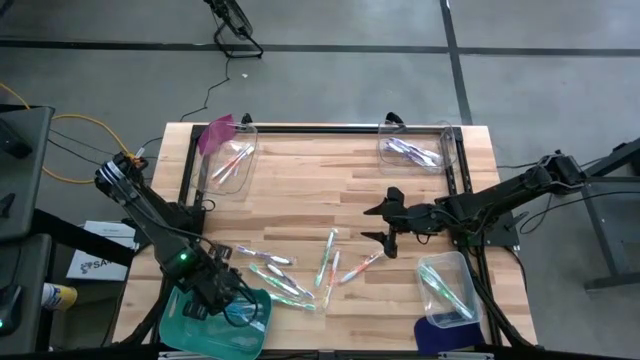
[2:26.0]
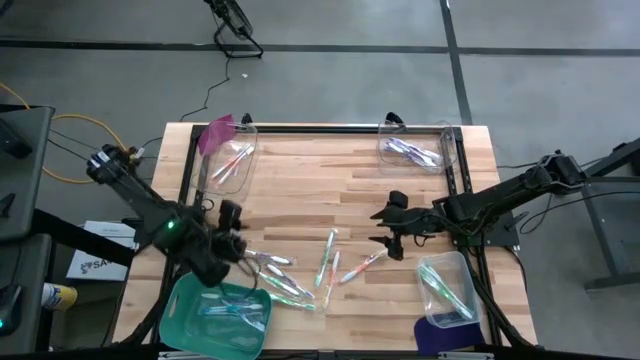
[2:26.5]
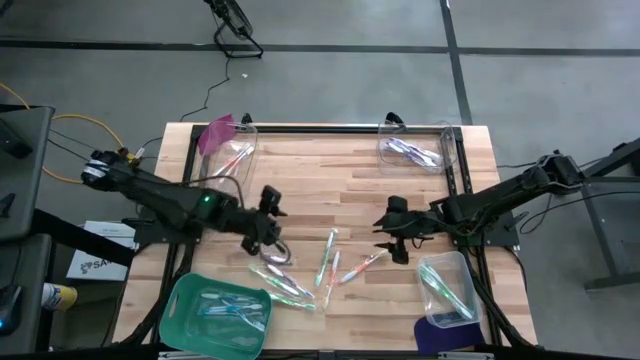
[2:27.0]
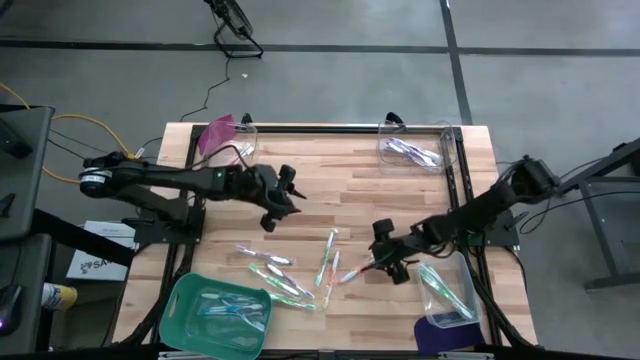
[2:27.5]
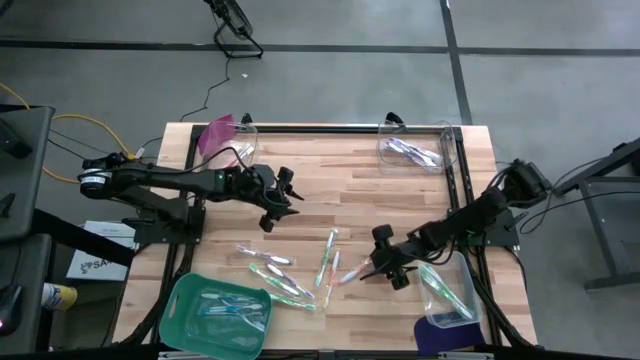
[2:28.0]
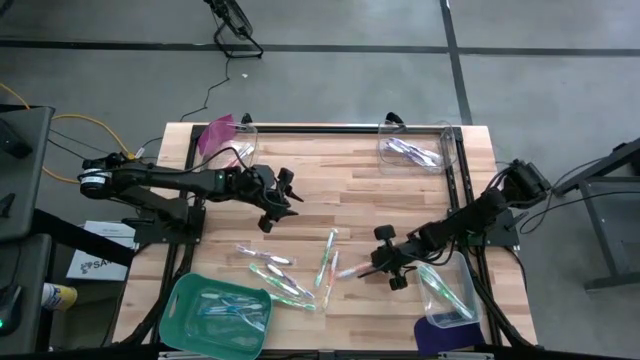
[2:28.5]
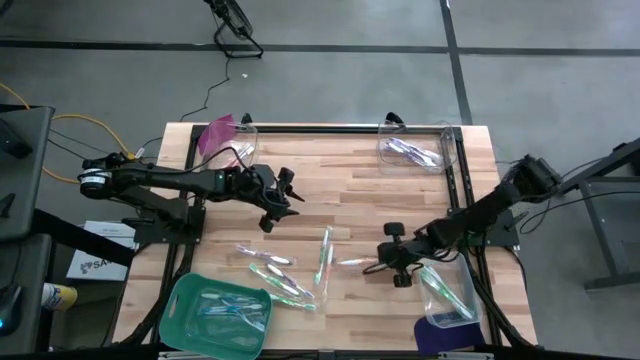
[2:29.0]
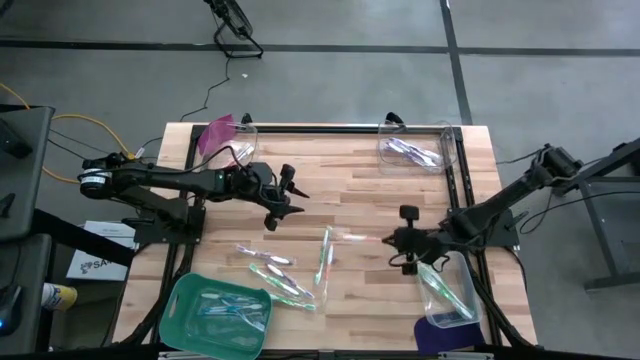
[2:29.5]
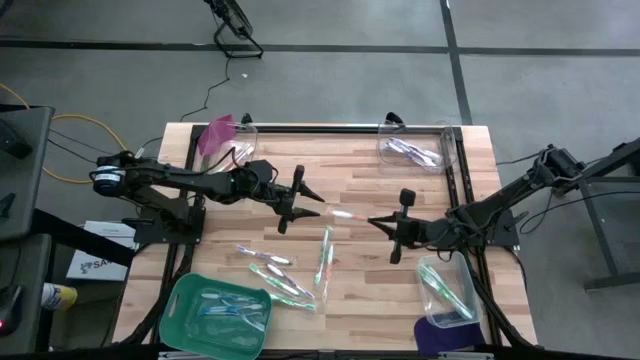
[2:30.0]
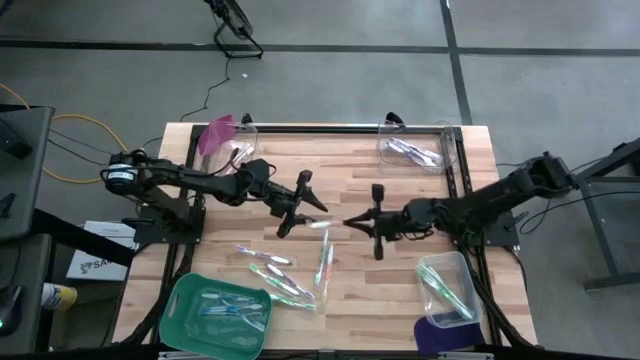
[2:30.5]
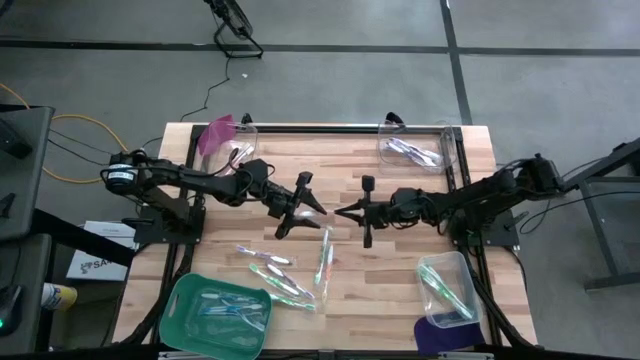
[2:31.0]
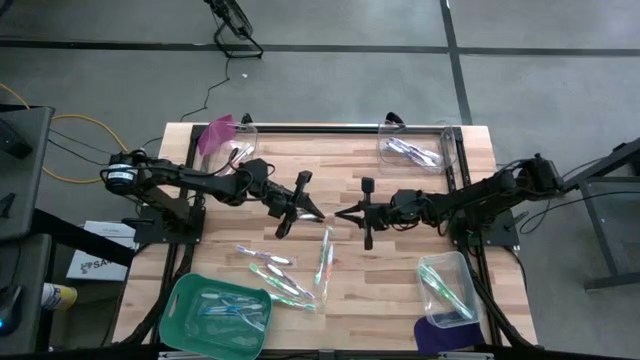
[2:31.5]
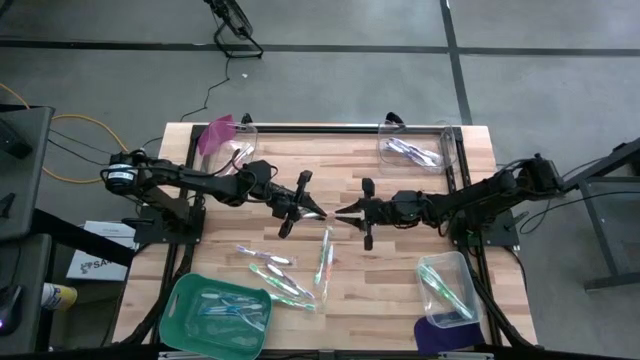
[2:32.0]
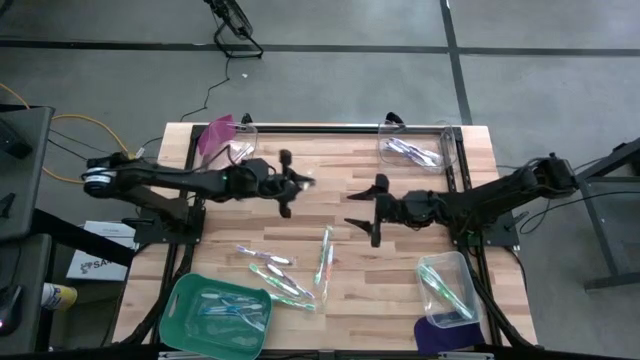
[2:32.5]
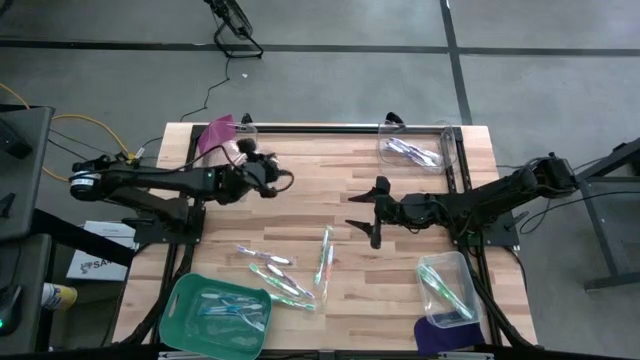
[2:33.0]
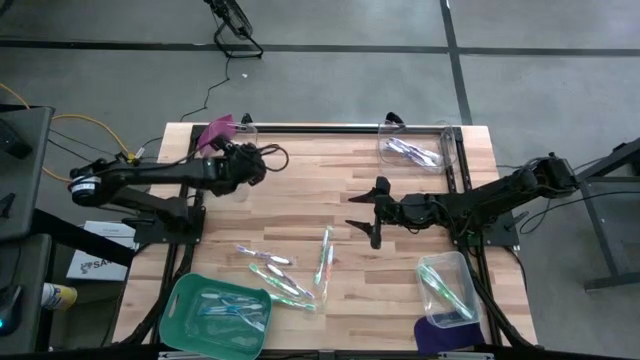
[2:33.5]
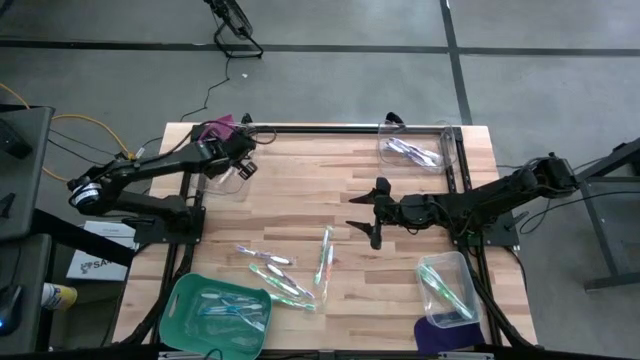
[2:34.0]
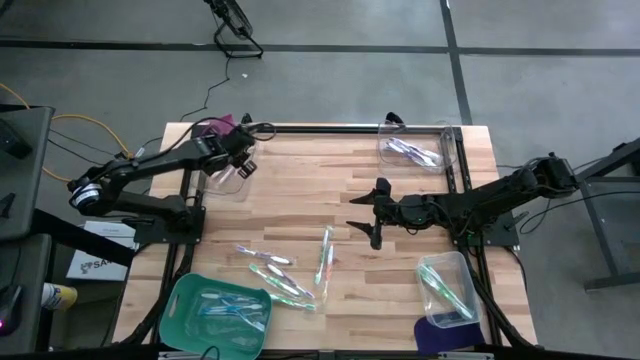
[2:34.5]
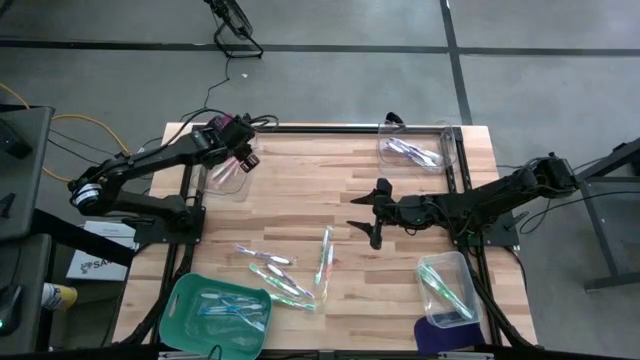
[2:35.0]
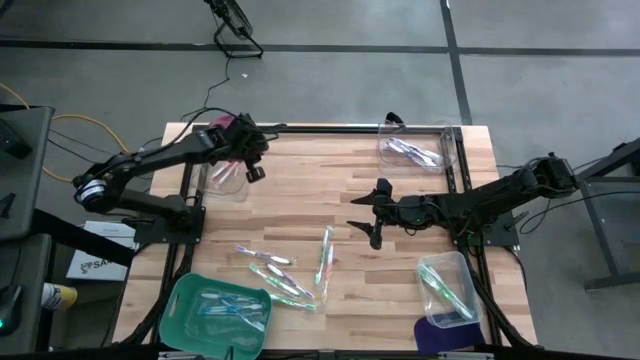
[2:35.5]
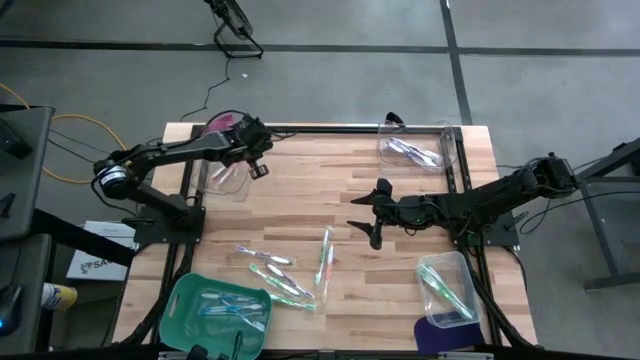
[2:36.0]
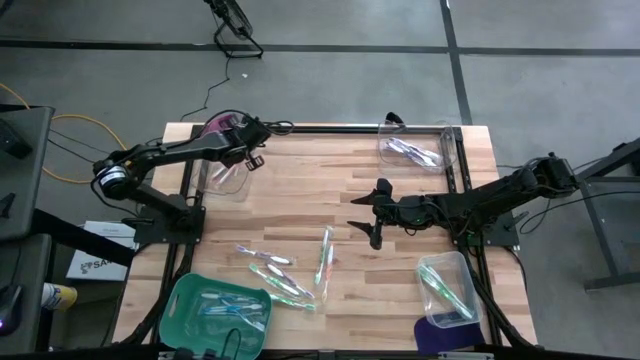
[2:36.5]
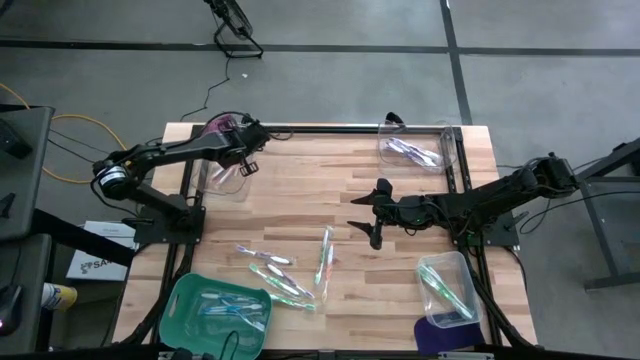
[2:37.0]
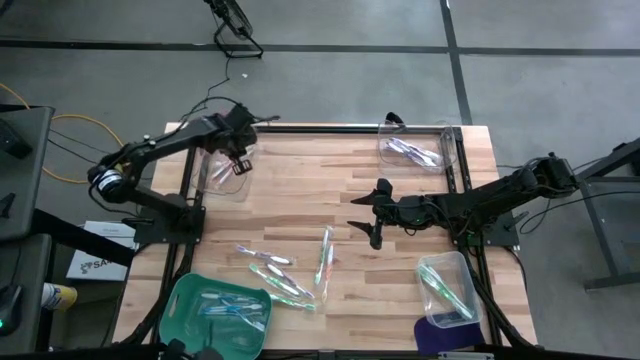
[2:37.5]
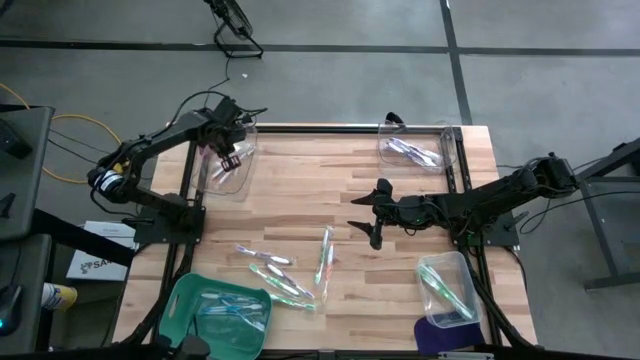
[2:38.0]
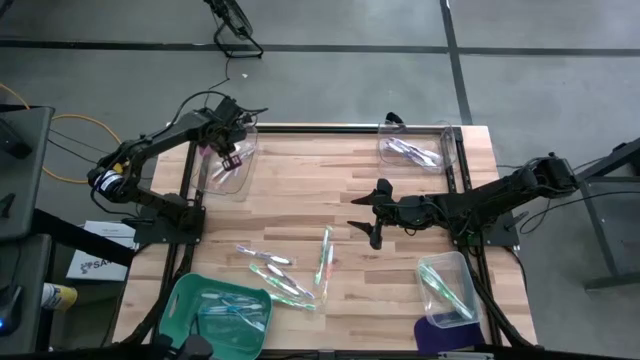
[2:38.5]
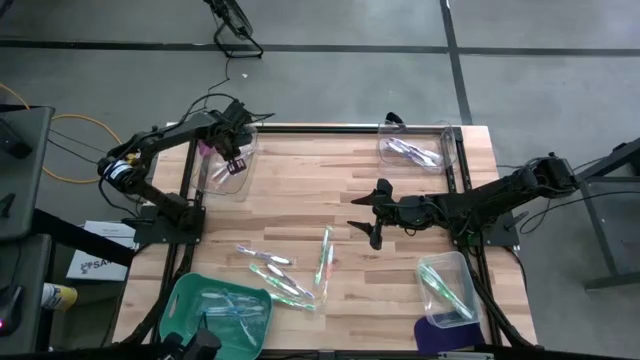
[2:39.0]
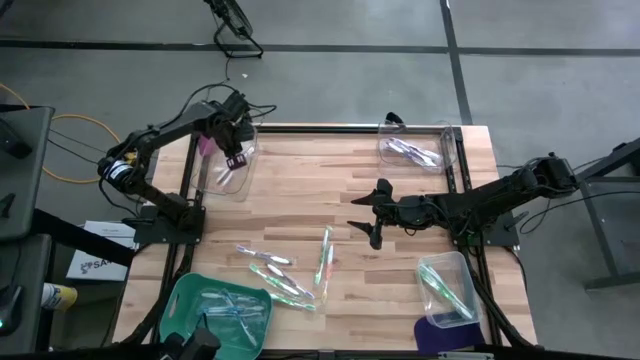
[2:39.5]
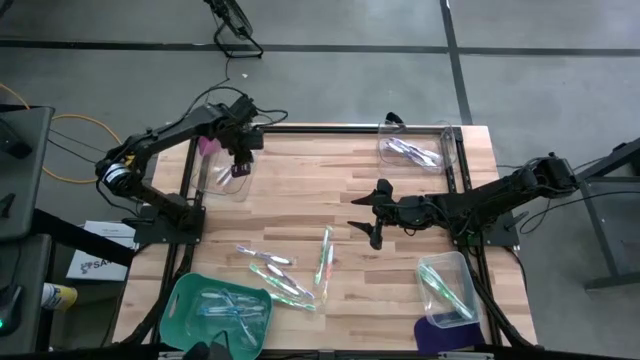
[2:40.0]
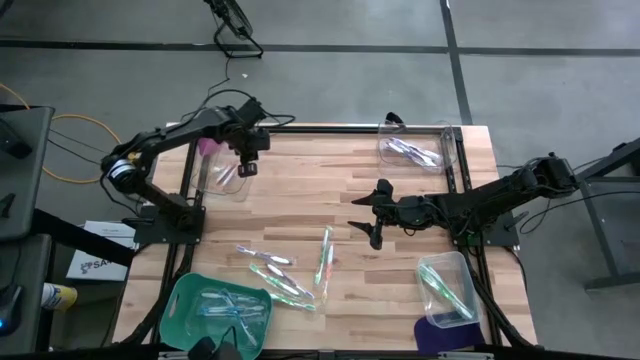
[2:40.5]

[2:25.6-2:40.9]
Task: Pick & Place Toothbrushes
Put the orange toothbrush into the left transparent bin

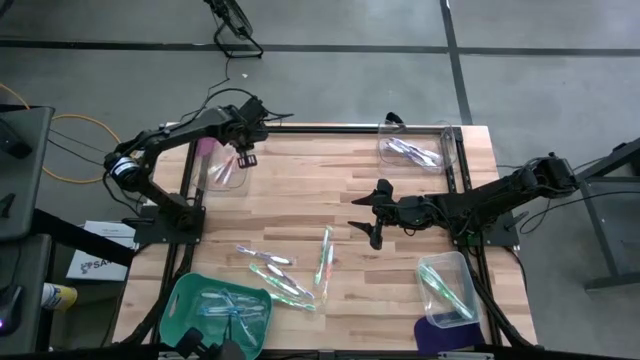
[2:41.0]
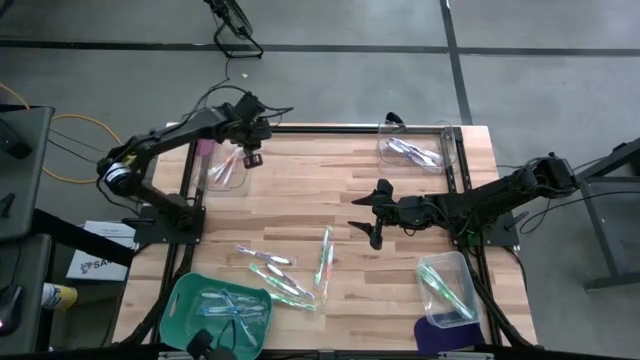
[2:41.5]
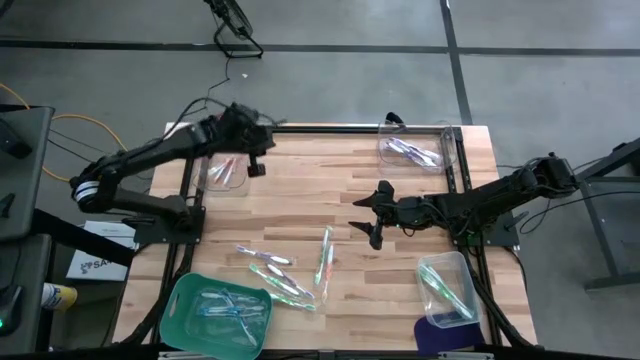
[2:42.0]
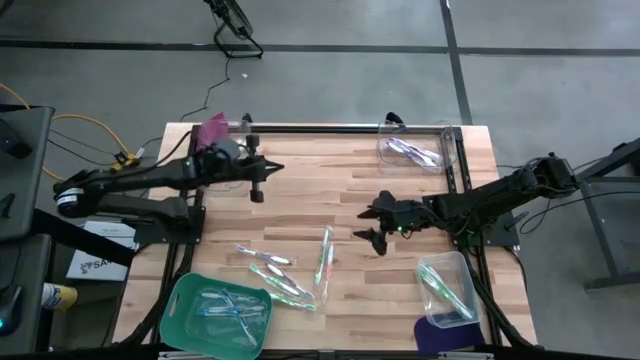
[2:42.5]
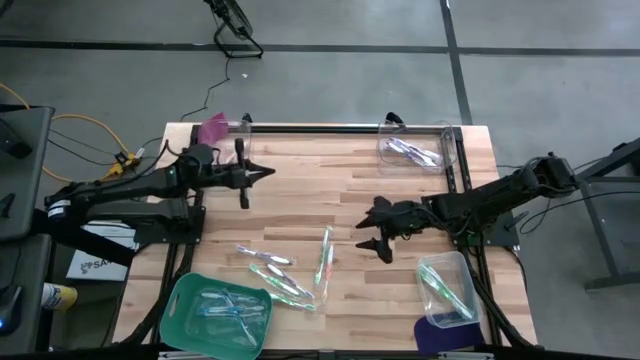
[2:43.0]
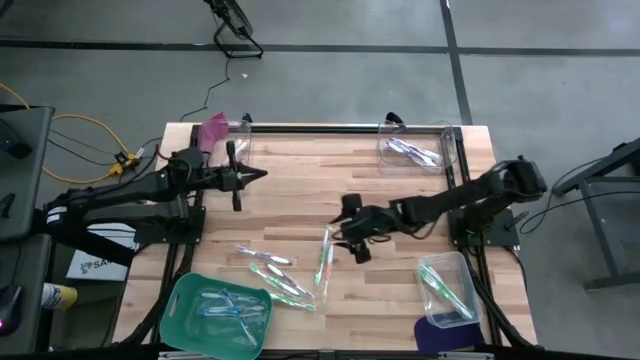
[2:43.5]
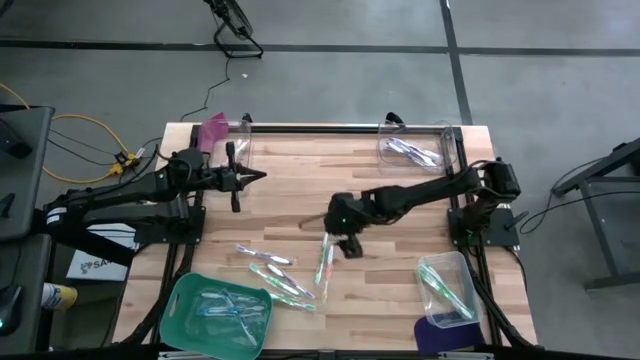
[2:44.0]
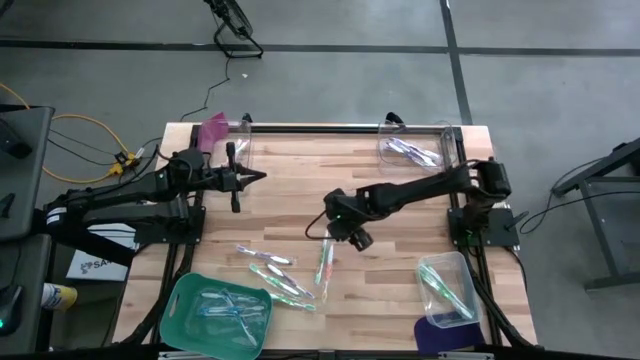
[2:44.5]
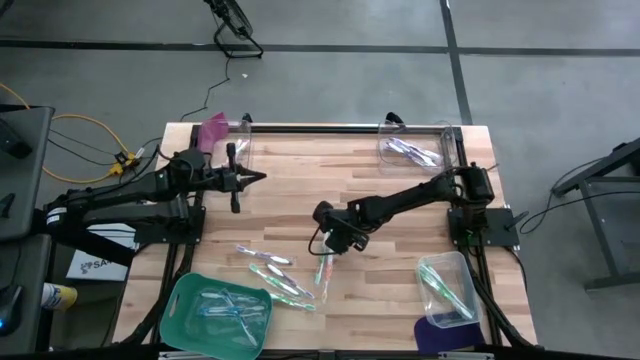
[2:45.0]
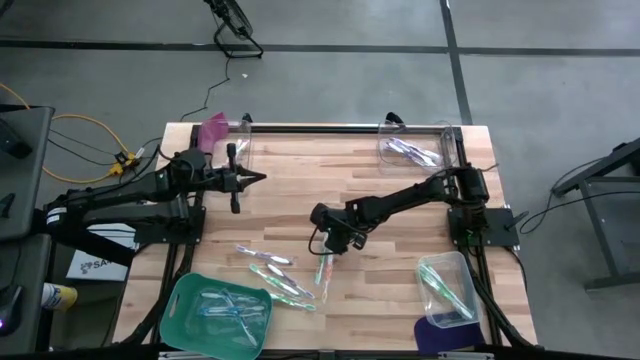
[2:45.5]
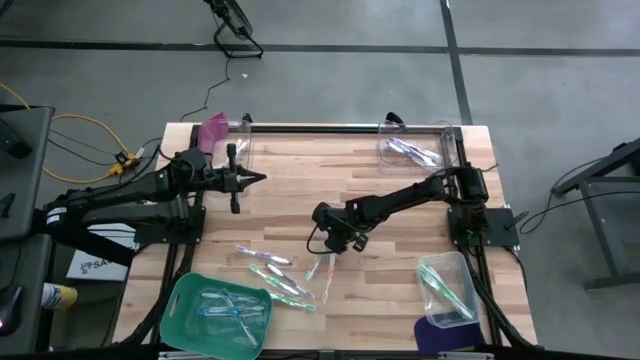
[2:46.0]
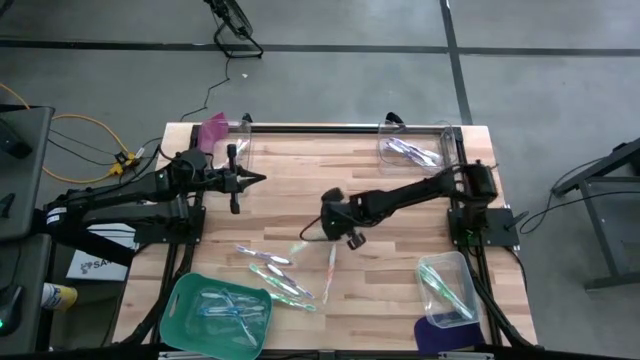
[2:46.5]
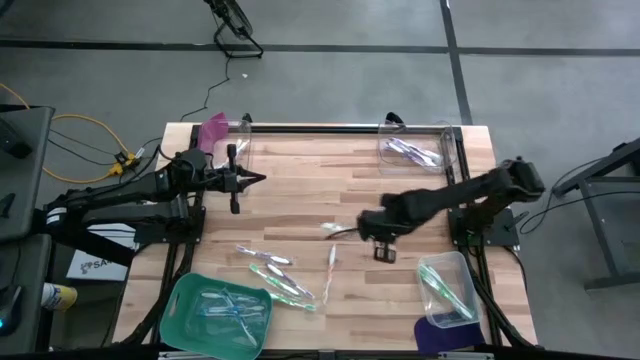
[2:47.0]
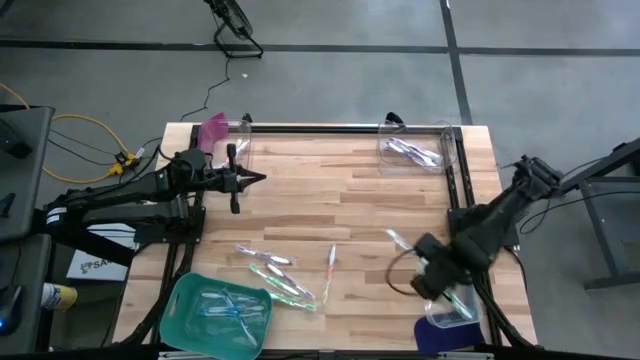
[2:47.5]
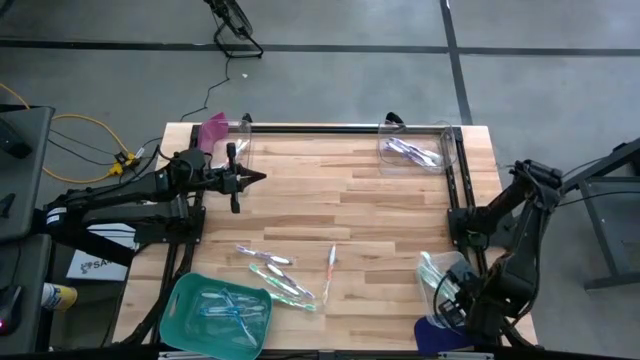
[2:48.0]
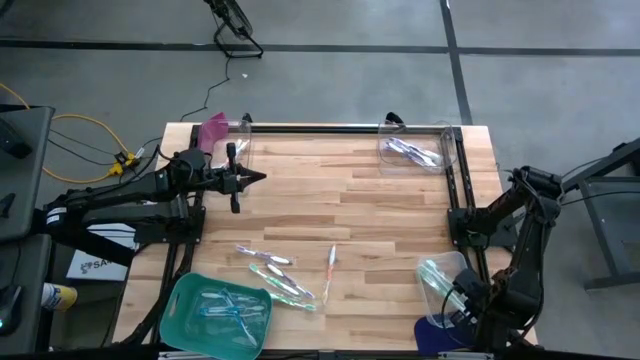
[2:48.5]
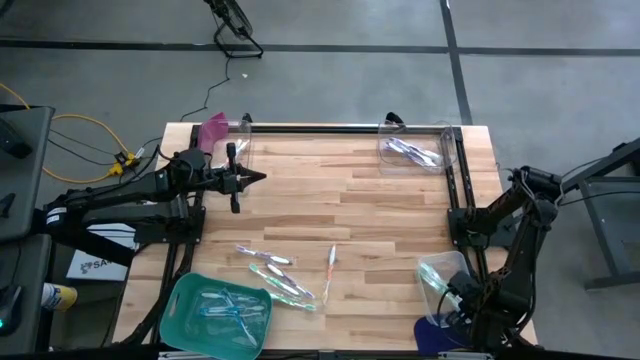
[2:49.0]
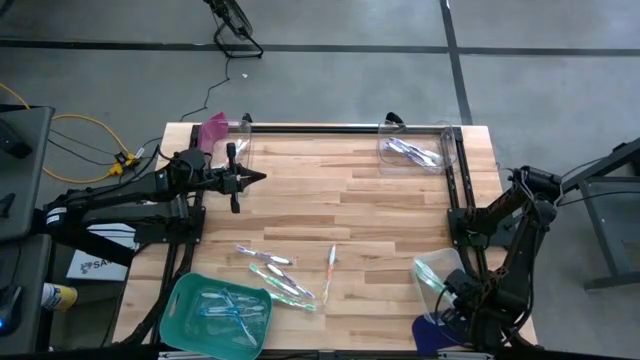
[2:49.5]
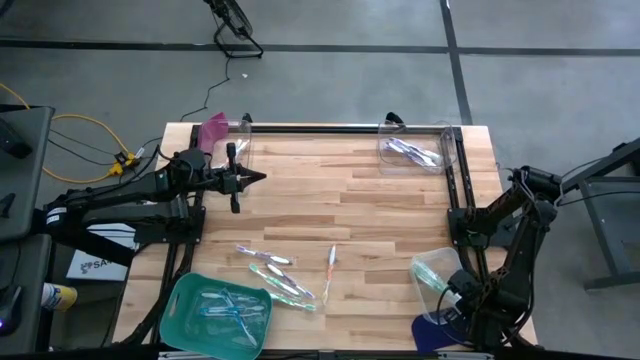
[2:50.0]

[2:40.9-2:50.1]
Put the green toothbrush into the white bin
